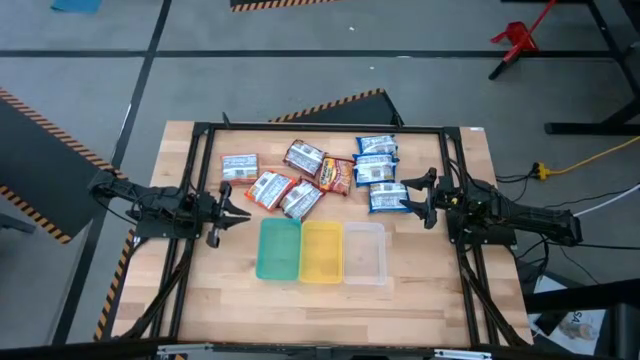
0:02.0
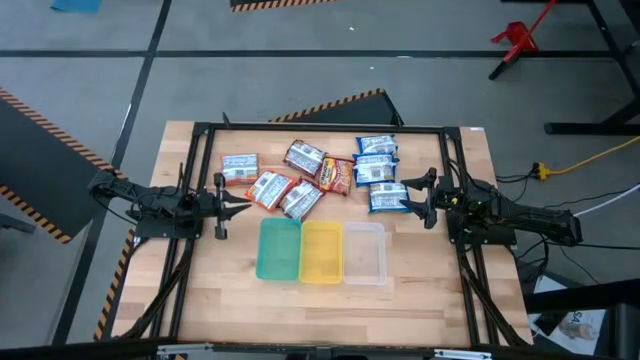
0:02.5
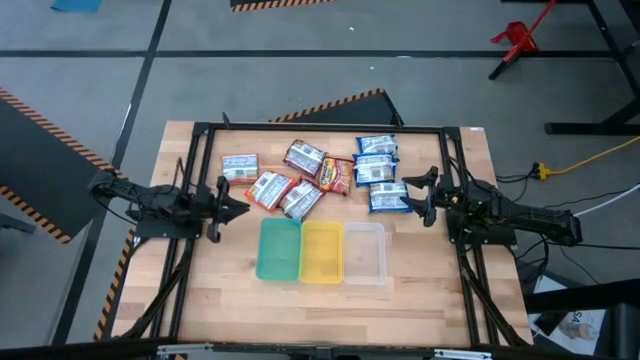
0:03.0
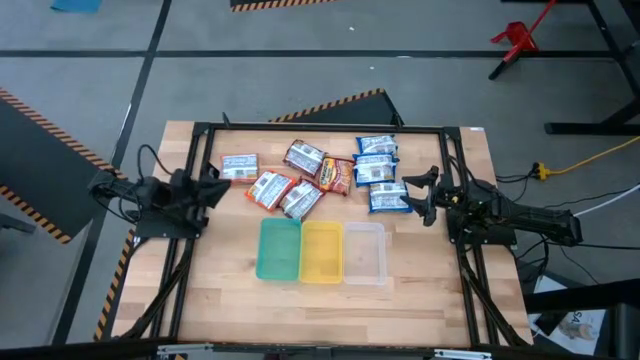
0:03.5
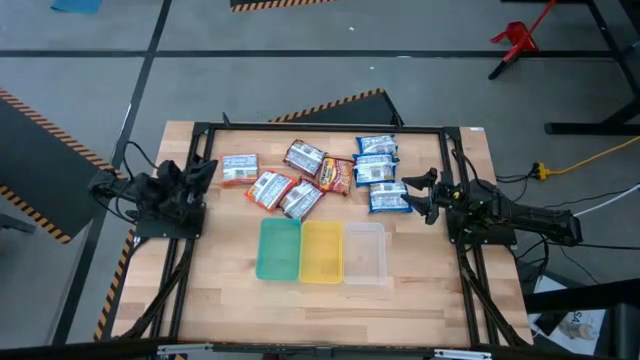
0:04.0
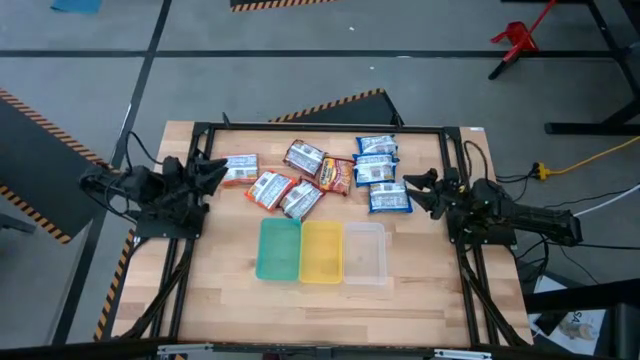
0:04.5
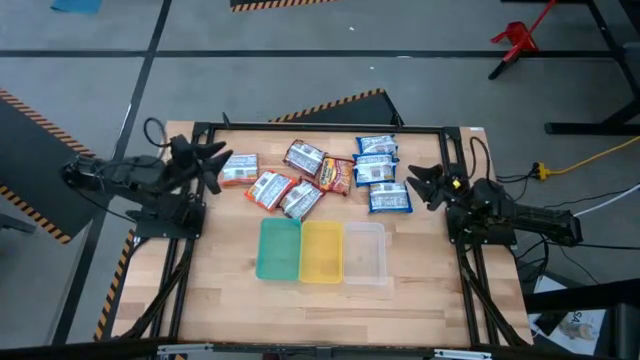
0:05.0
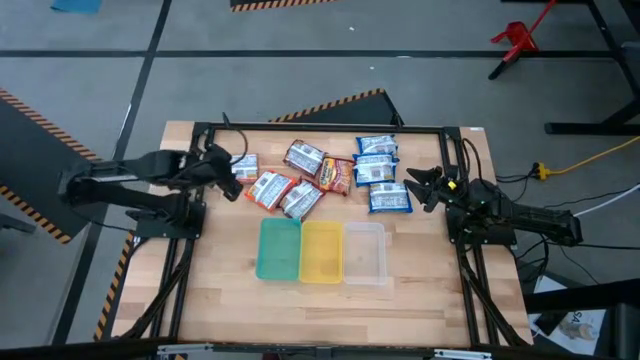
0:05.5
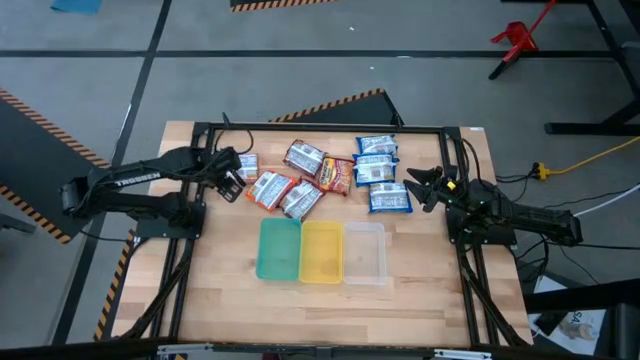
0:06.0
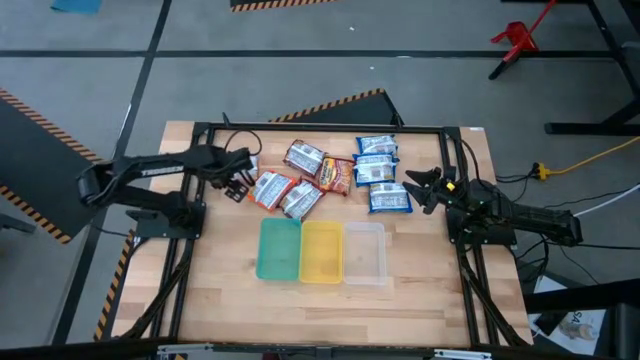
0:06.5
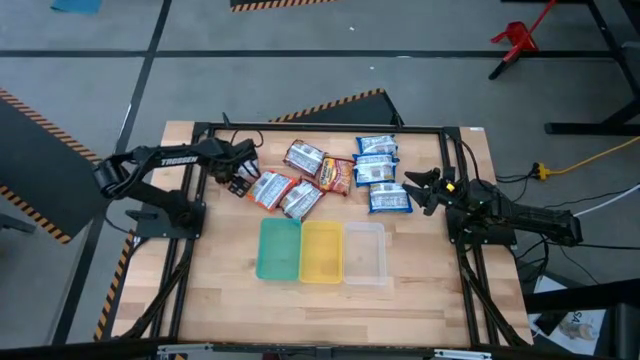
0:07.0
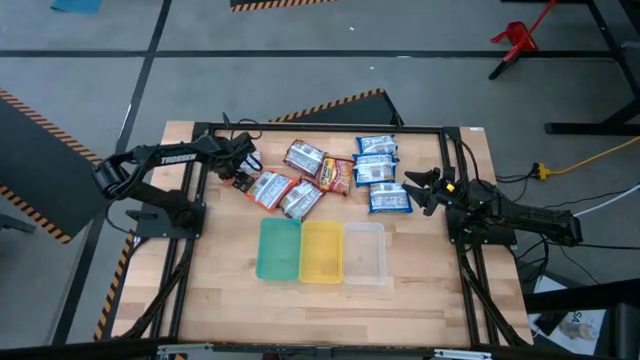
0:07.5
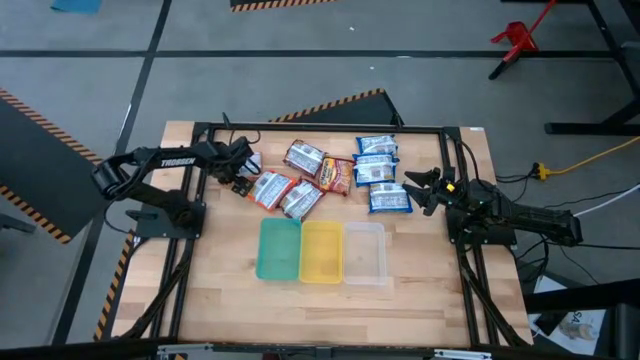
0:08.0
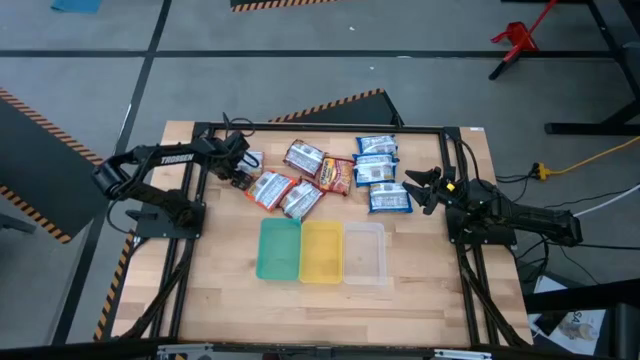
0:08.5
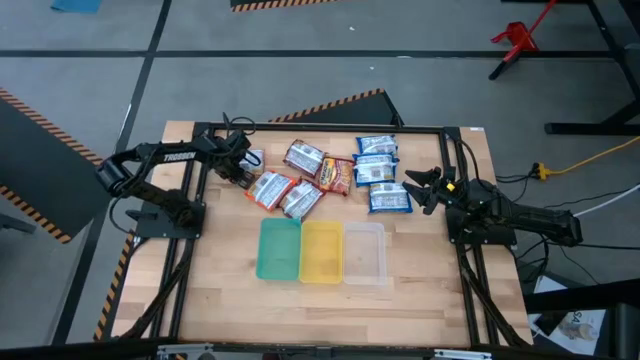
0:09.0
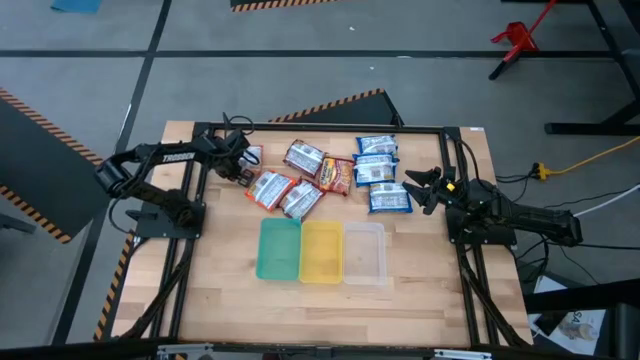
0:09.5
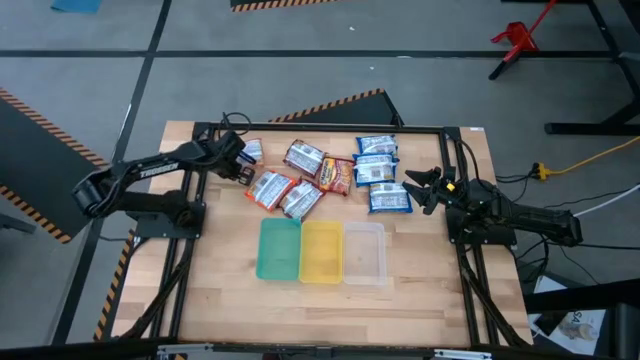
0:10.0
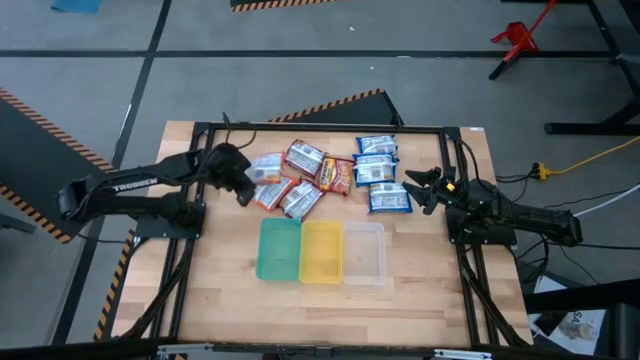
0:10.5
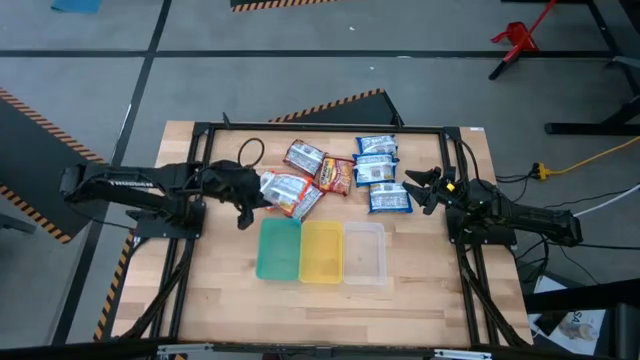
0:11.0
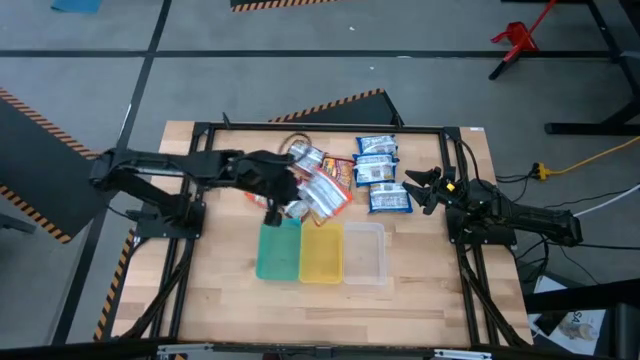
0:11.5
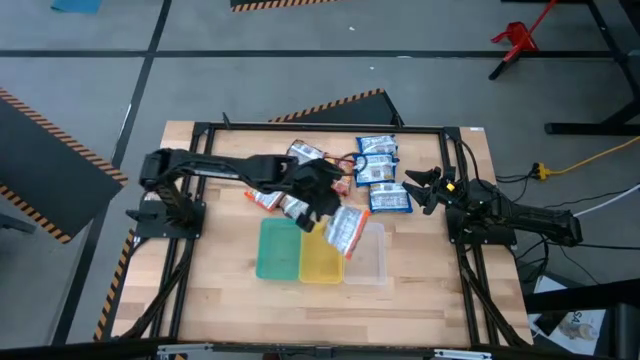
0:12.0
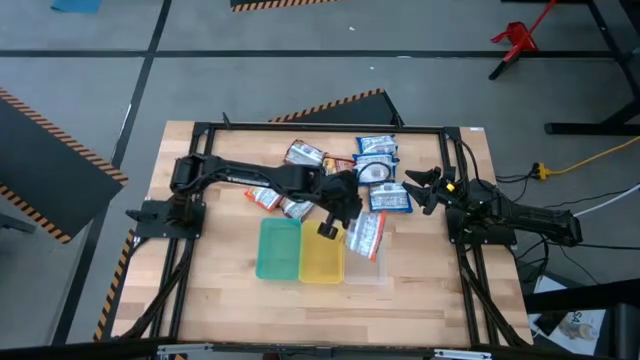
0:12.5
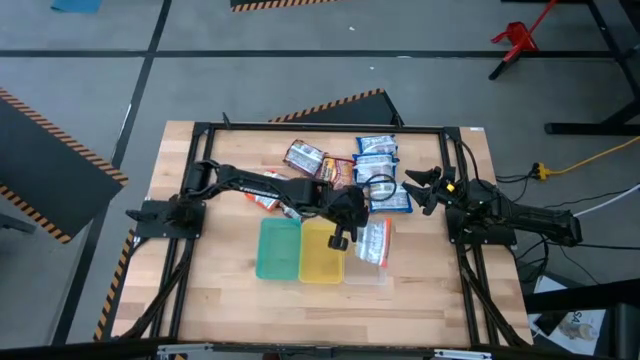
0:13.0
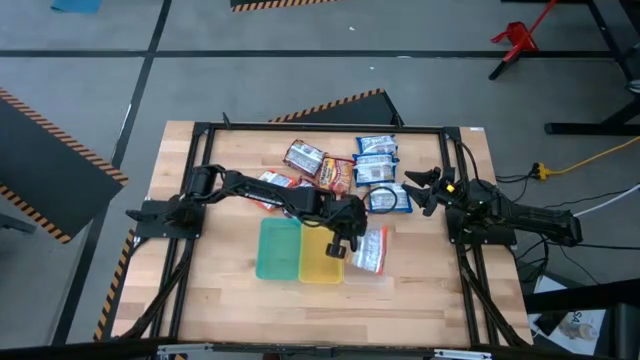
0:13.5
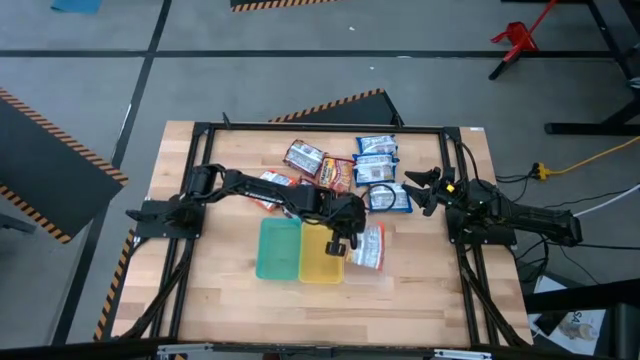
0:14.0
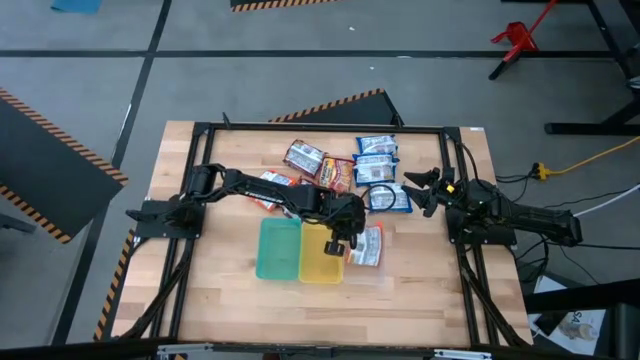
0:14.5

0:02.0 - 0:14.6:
Task: Sort Maruchan noodles
Put the left orange noodle pack into the transparent bin

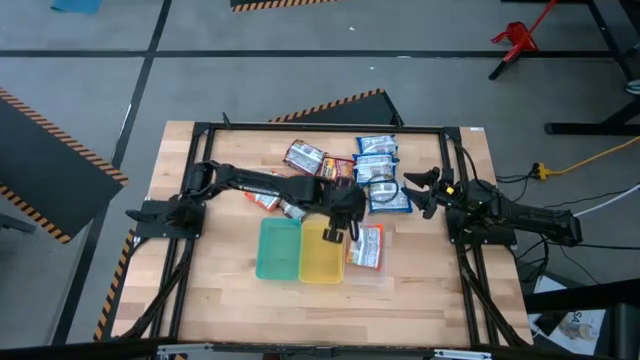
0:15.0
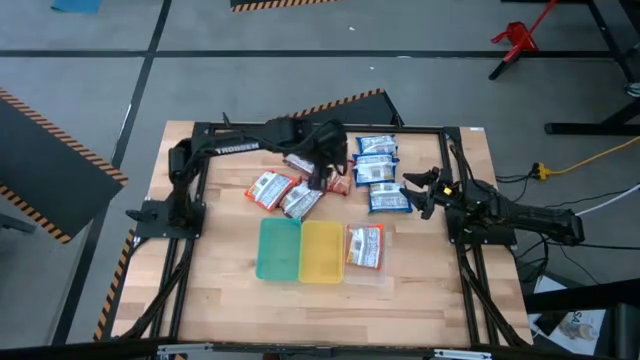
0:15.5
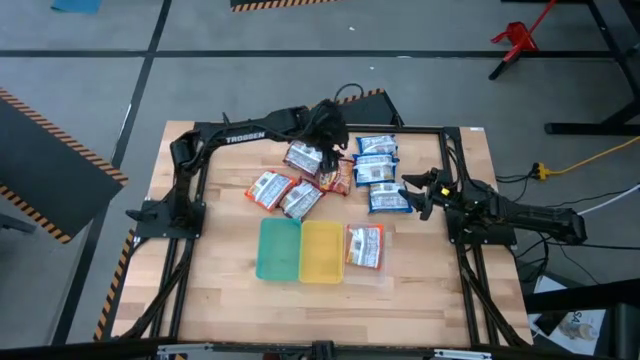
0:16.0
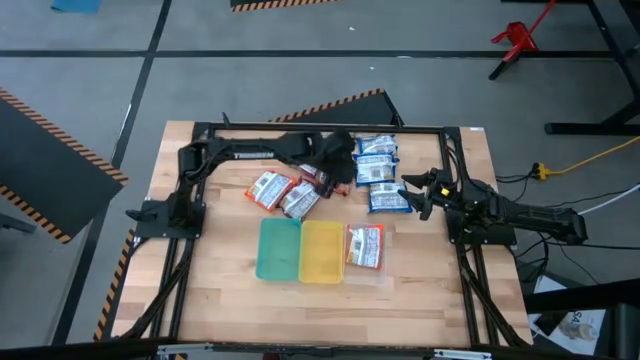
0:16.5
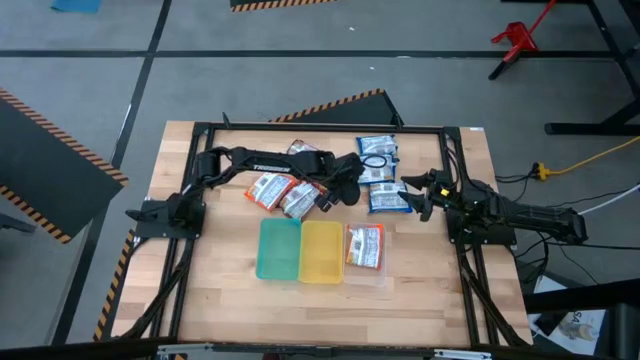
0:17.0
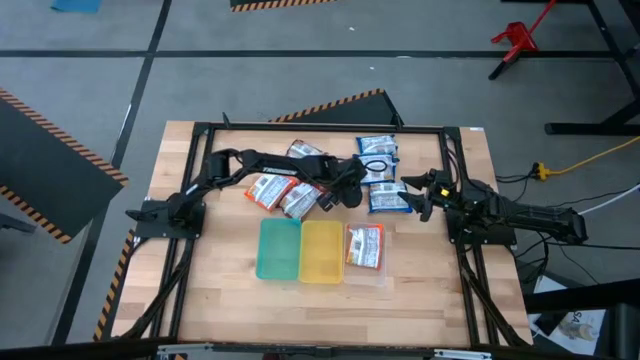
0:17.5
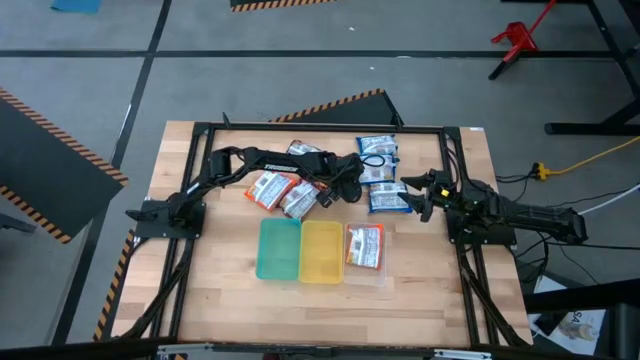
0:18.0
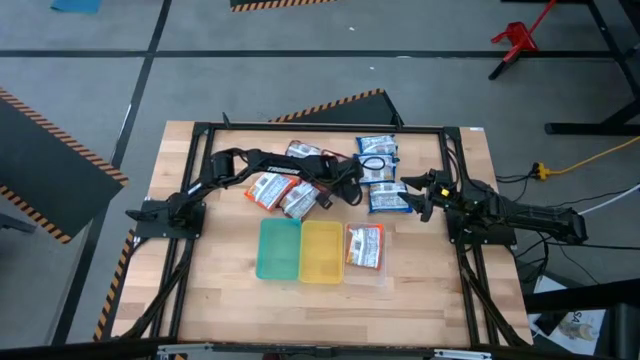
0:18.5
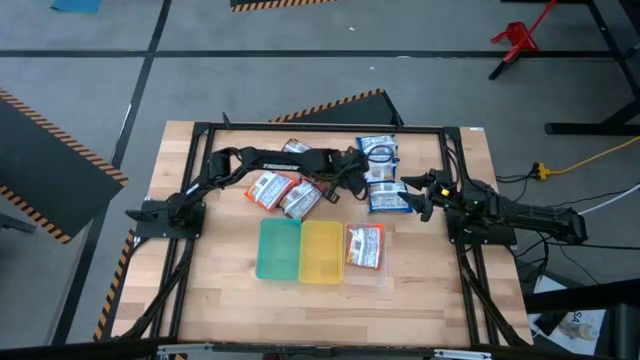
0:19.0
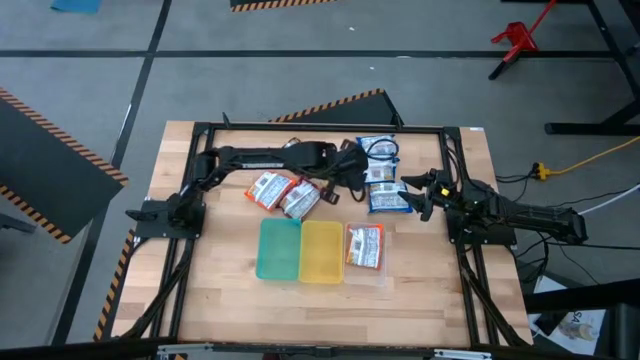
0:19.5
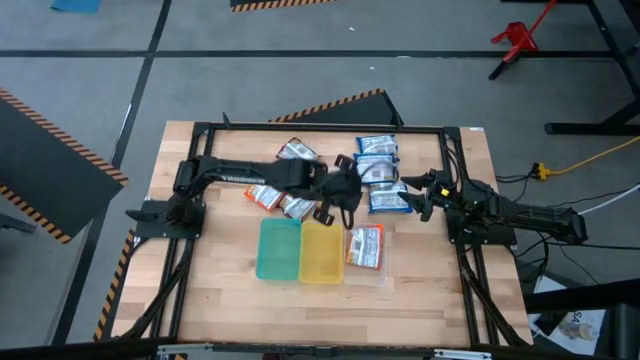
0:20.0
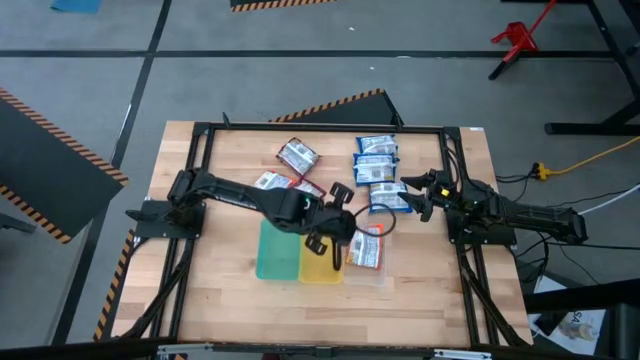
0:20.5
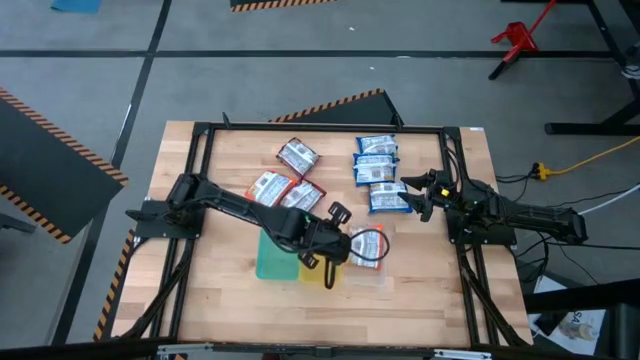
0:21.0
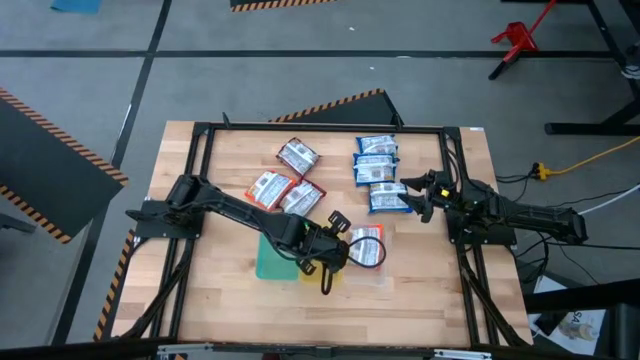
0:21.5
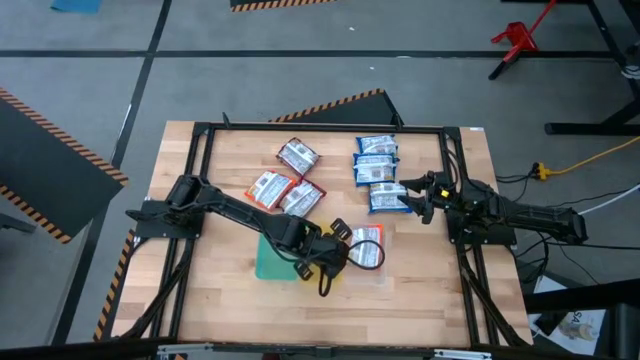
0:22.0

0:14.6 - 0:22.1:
Put the middle right red noodle pack into the yellow bin

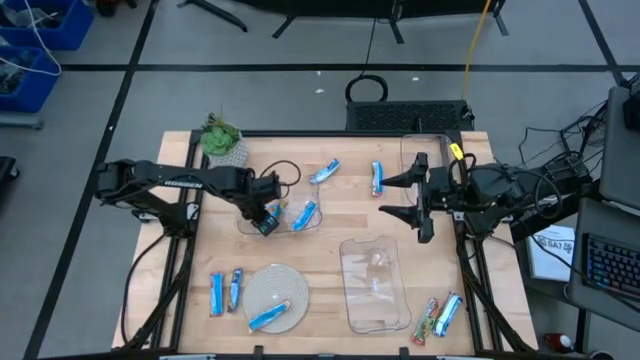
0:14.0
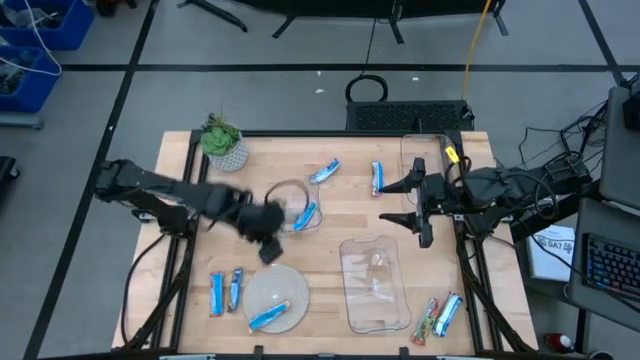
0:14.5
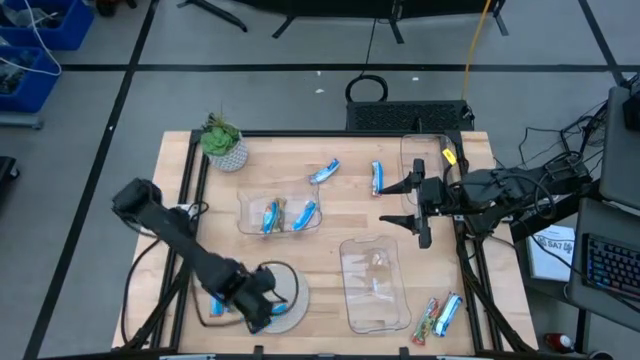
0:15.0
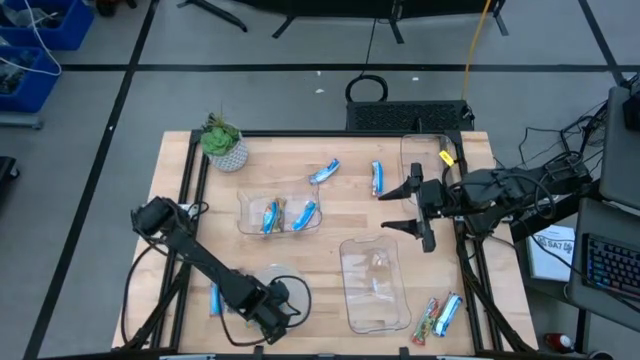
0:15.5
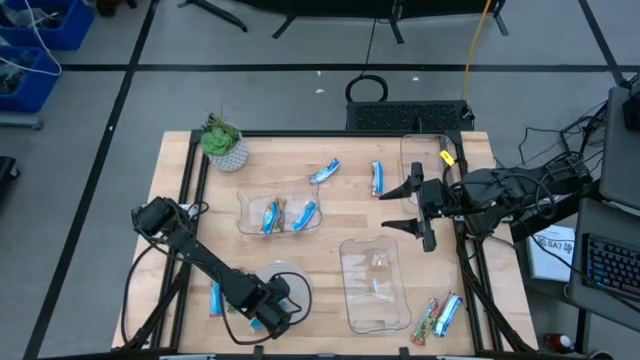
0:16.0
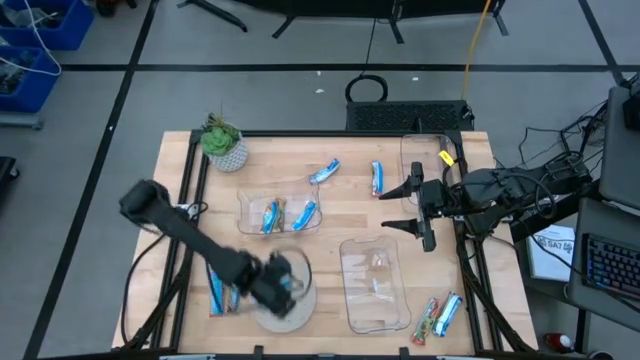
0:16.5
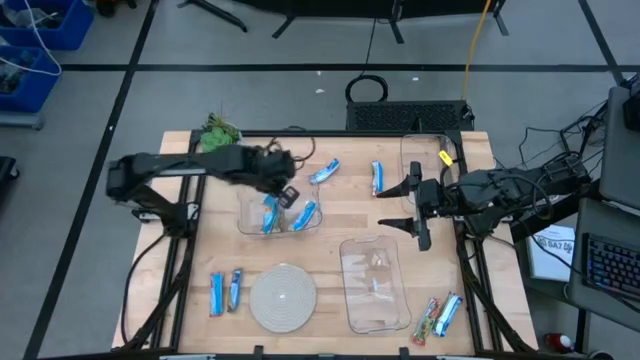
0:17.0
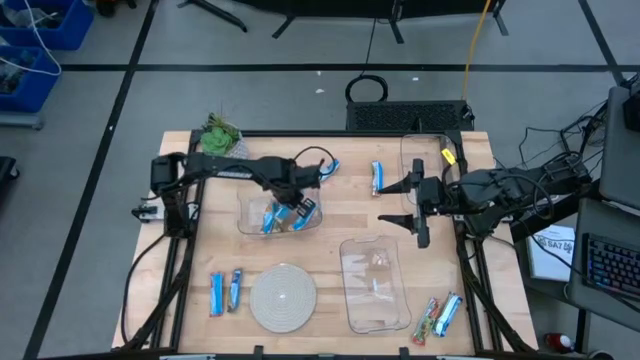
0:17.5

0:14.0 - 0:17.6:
Task: Pick and place Granola Bars by type
Put the yellow granola bar into the top left transparent bin
